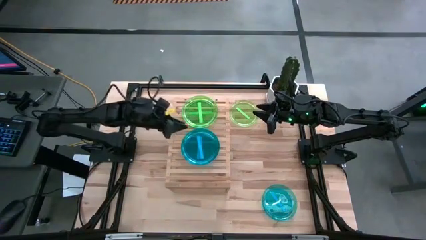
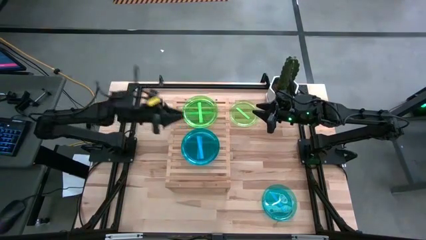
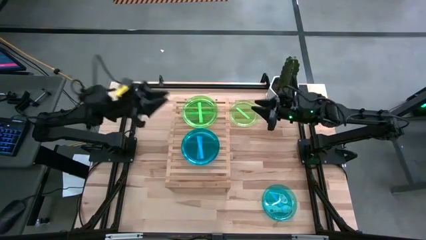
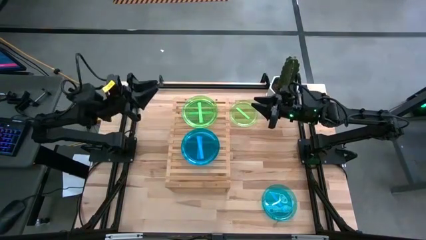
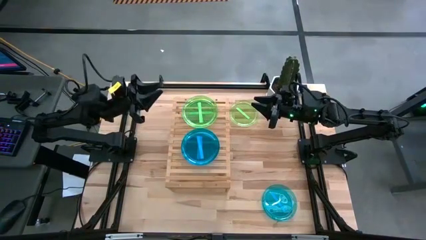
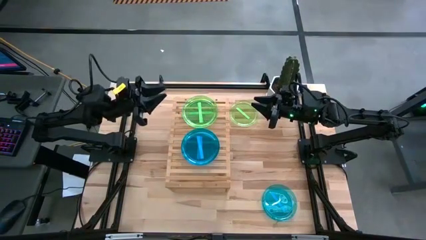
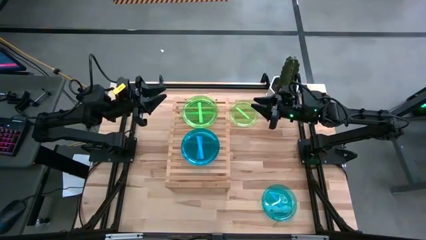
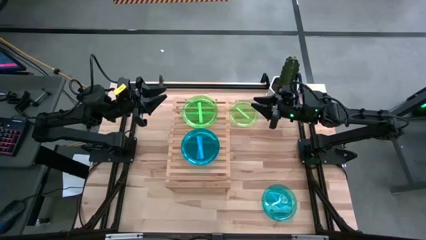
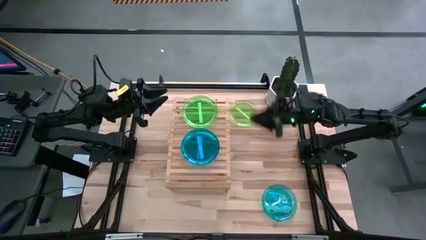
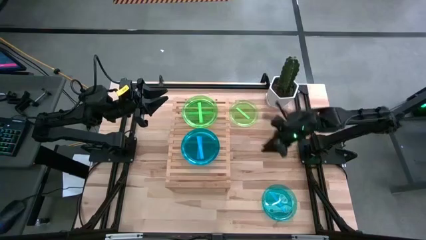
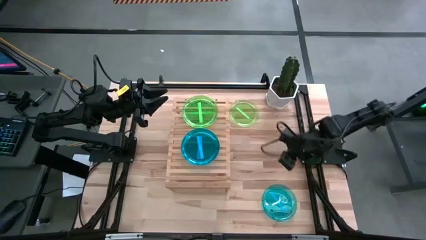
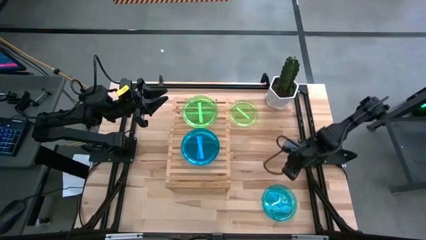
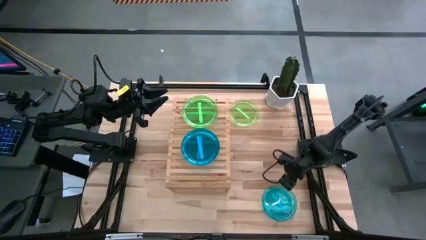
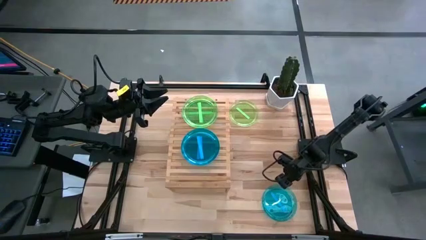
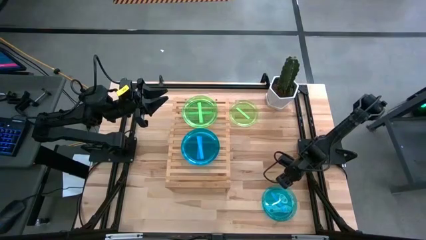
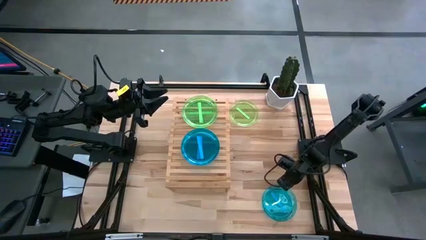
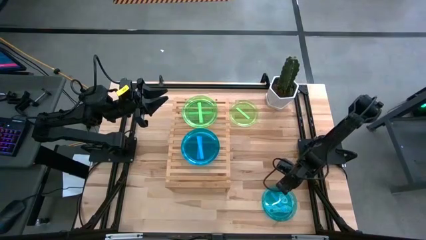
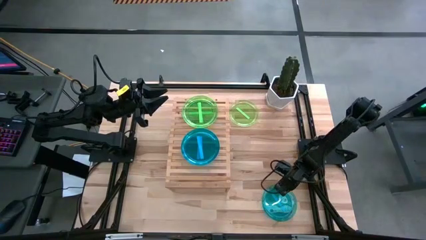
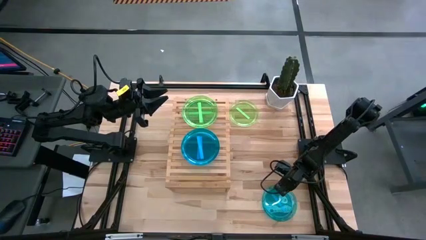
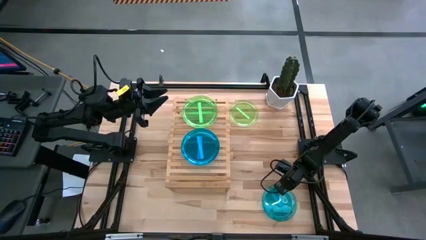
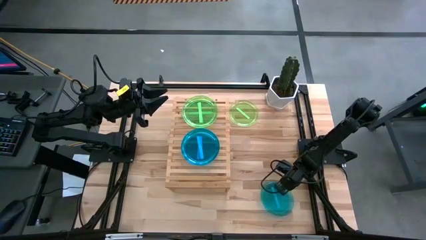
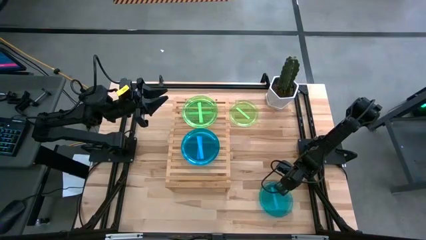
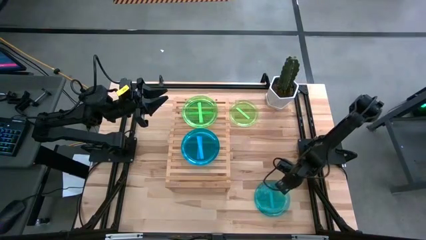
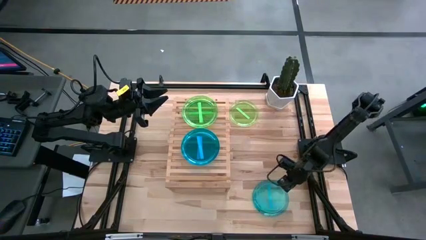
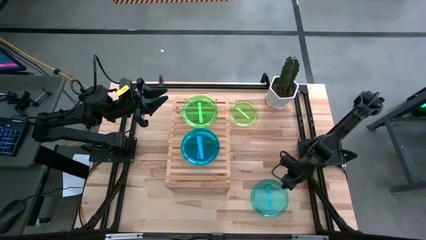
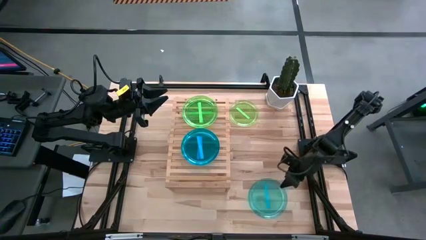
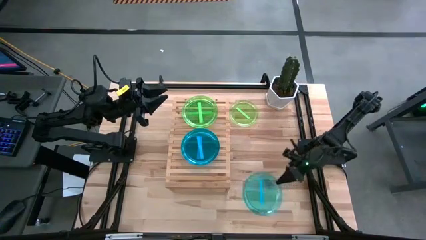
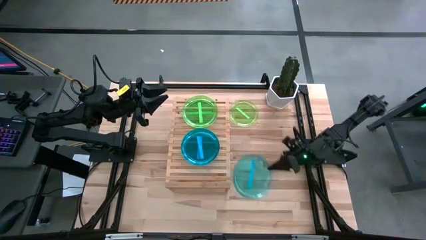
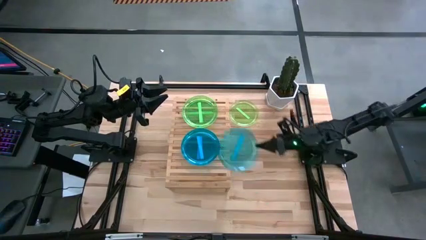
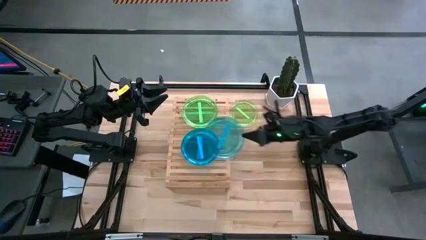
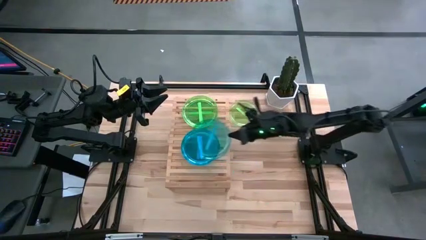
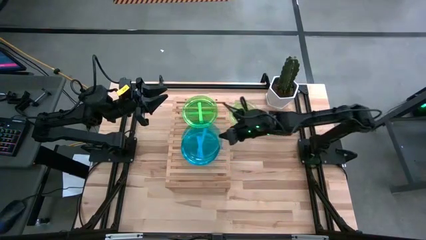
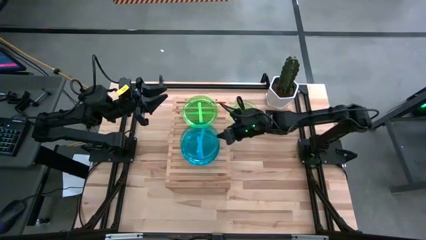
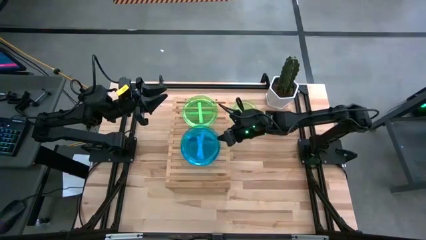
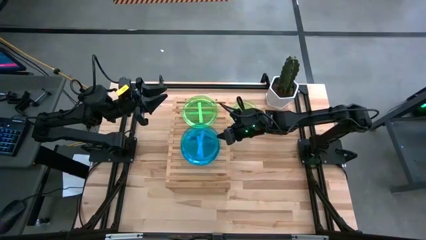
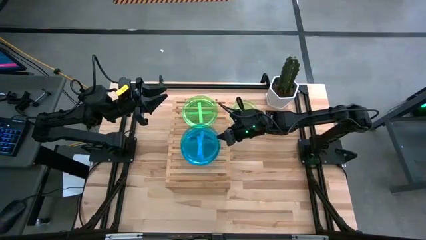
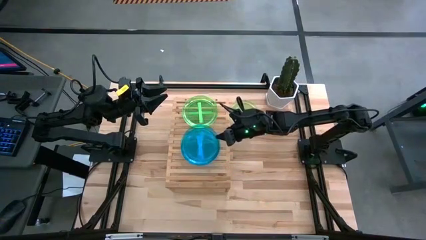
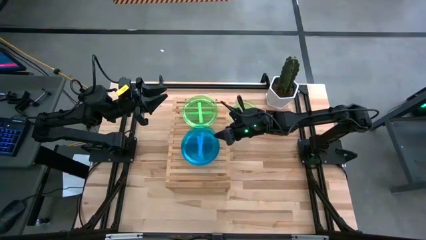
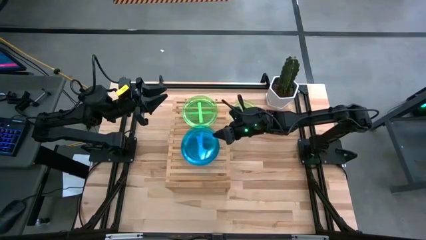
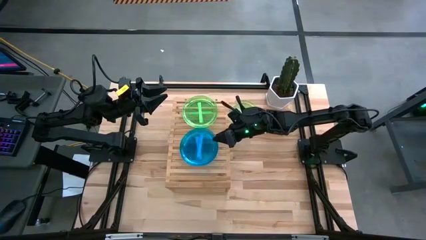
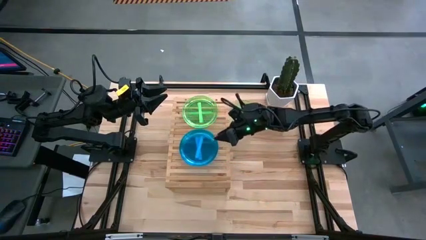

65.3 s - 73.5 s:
Task: Place and stack plates onto a shelf
Stack the blue plate on top of the blue plate on the shelf

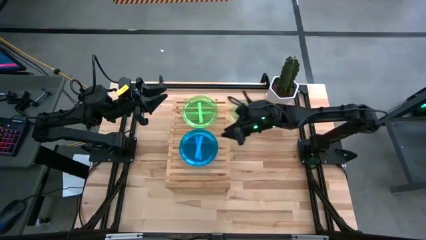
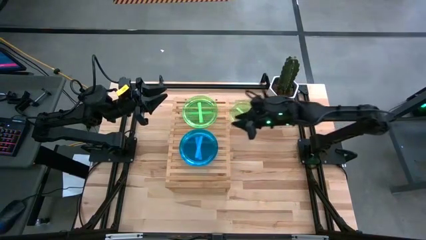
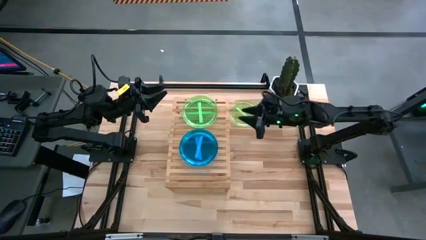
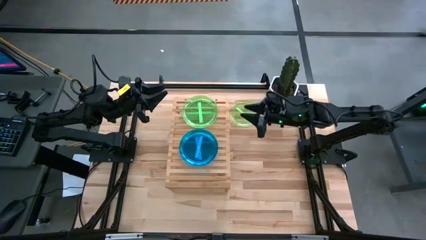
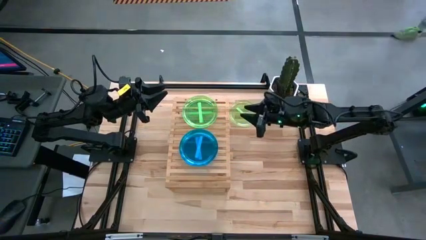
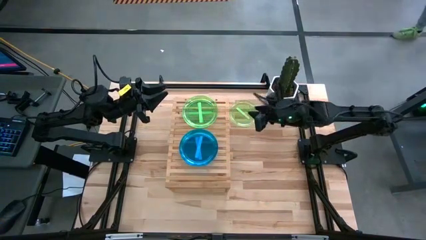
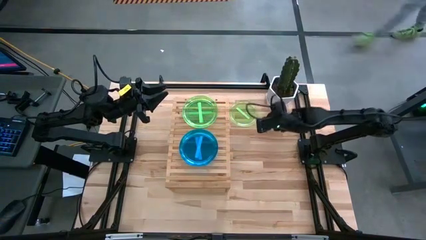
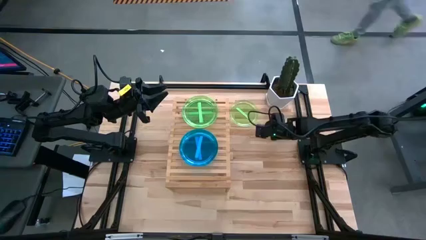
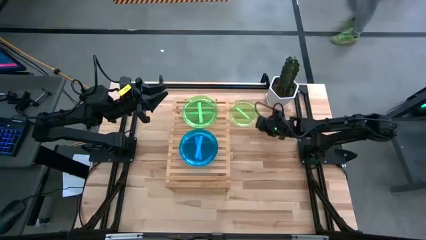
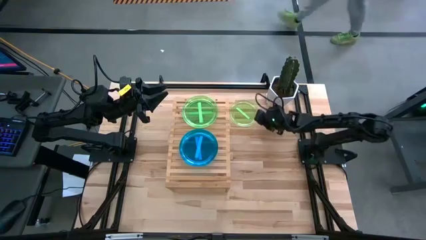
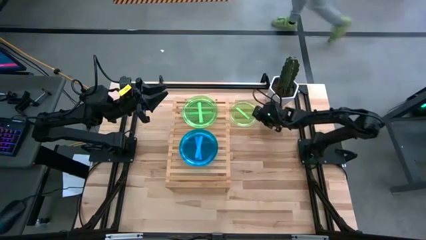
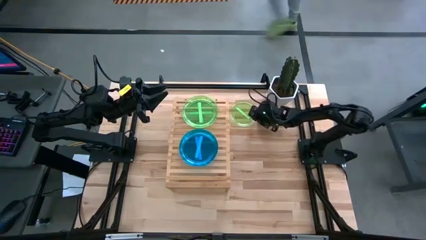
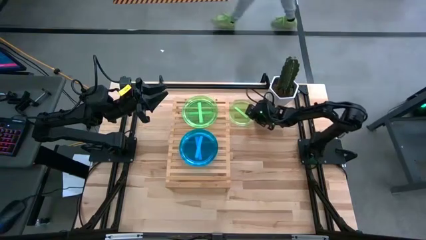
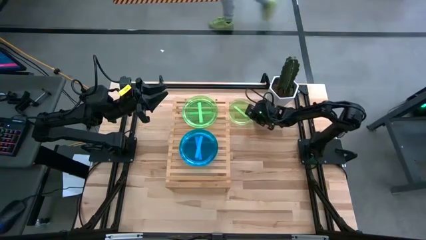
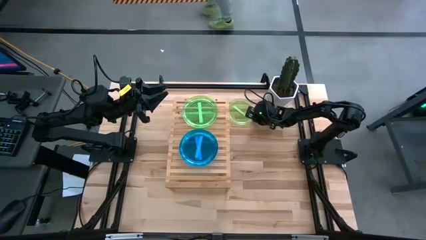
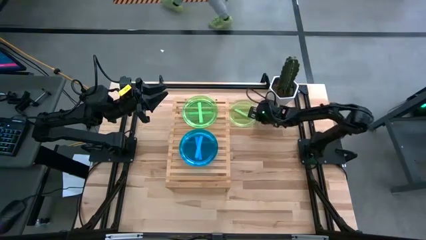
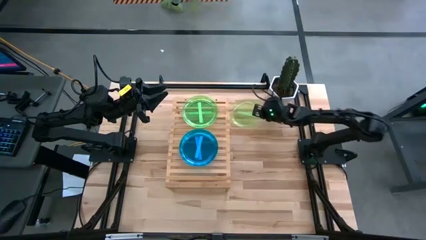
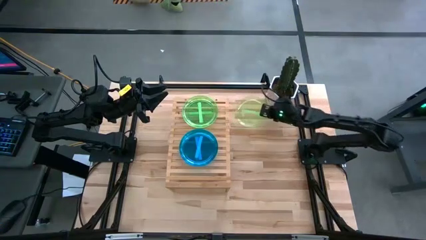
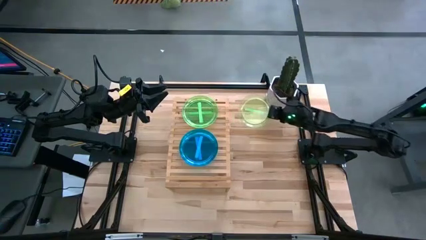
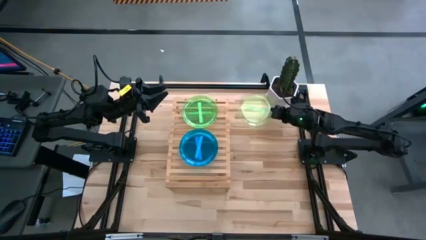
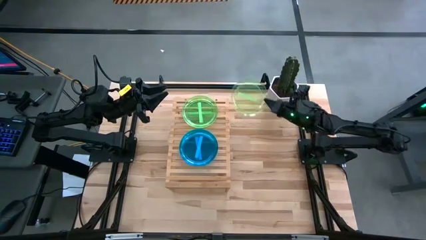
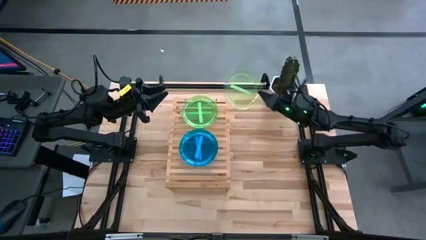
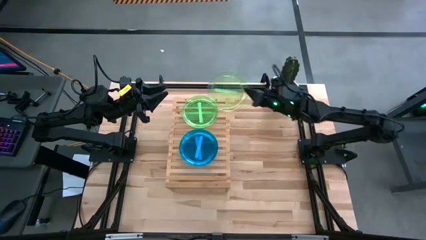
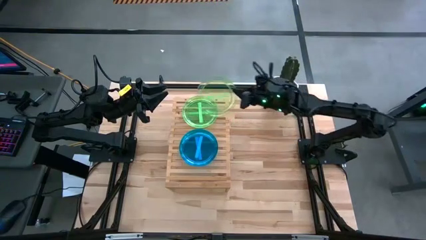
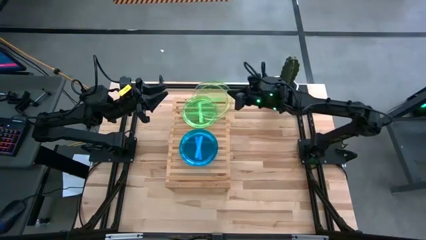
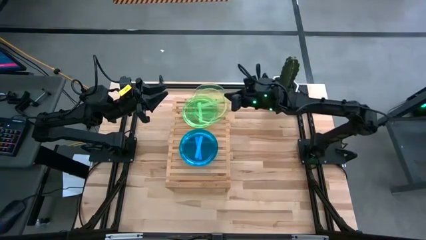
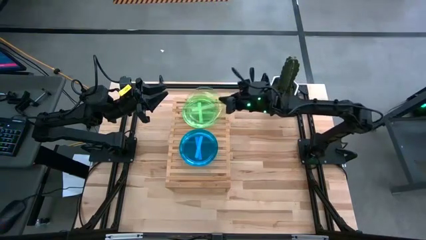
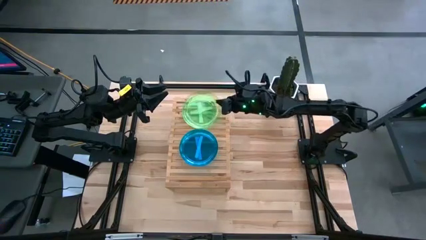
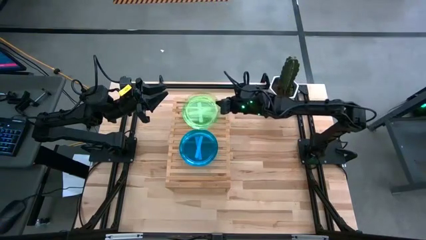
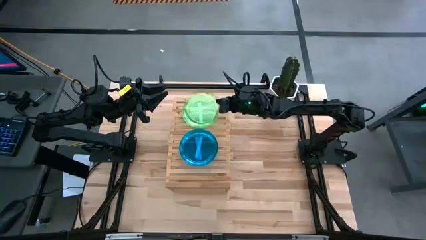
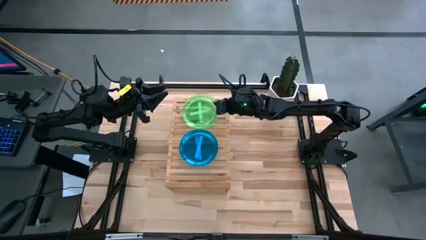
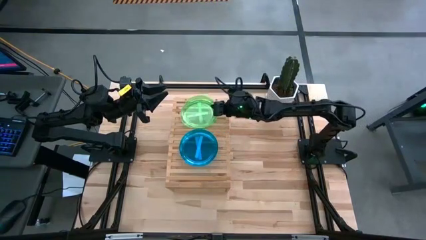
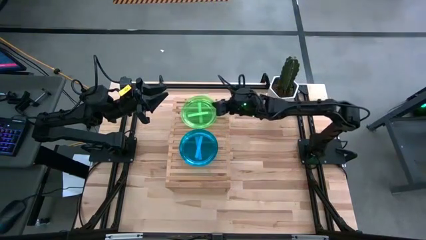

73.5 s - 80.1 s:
Stack the green plate on top of the green plate on the shelf
